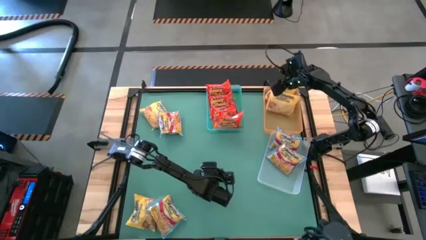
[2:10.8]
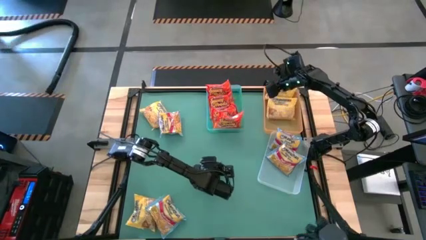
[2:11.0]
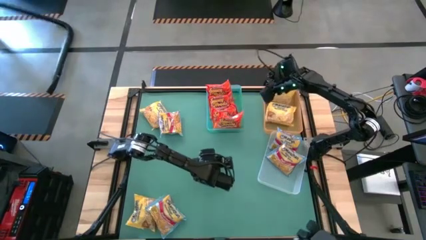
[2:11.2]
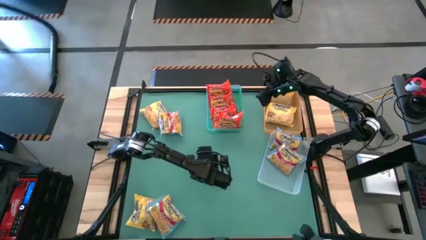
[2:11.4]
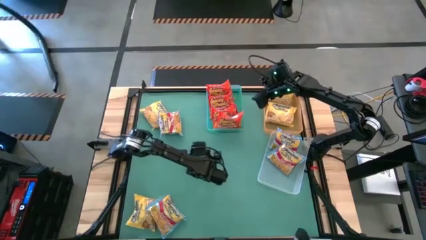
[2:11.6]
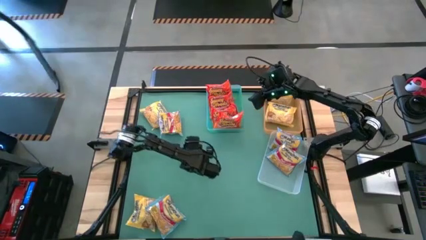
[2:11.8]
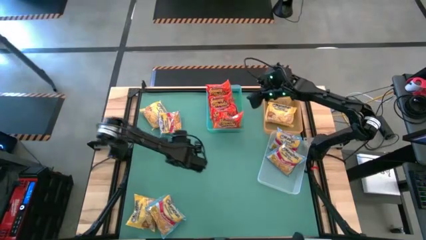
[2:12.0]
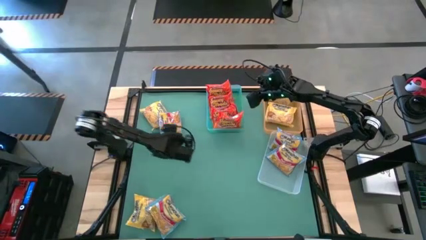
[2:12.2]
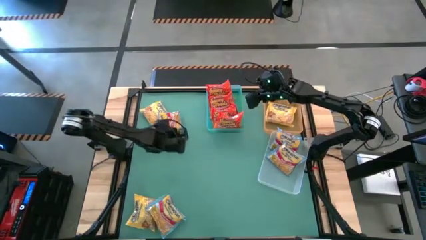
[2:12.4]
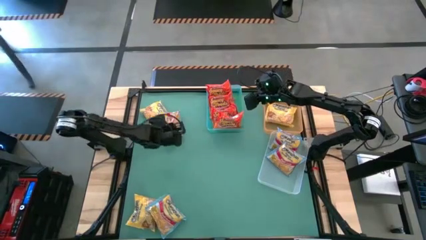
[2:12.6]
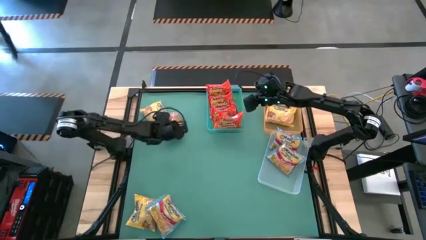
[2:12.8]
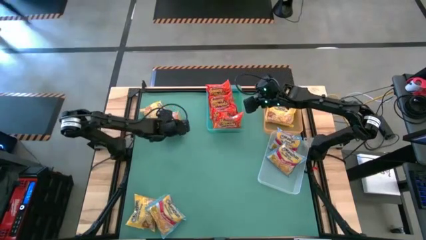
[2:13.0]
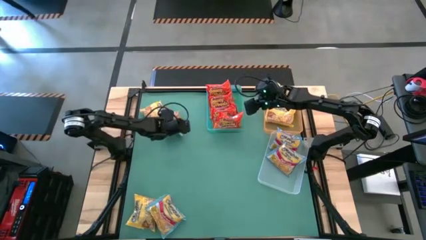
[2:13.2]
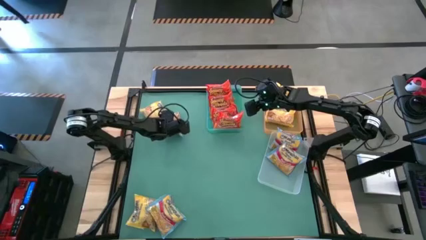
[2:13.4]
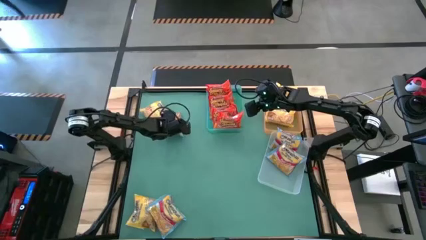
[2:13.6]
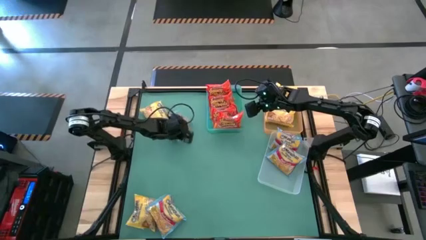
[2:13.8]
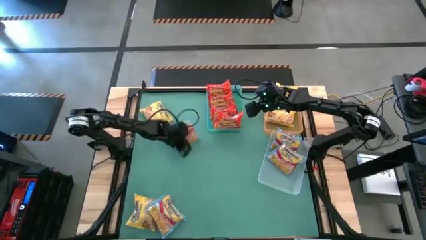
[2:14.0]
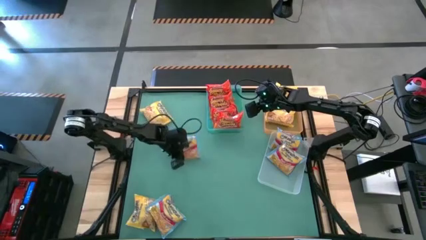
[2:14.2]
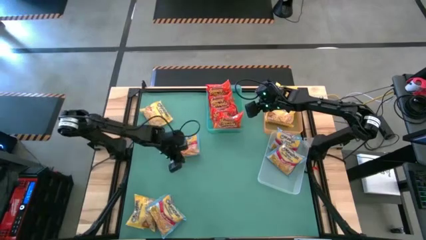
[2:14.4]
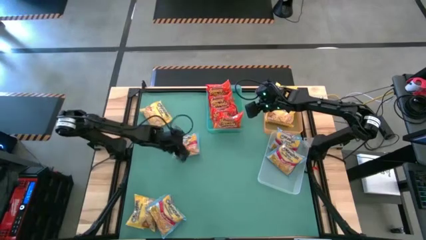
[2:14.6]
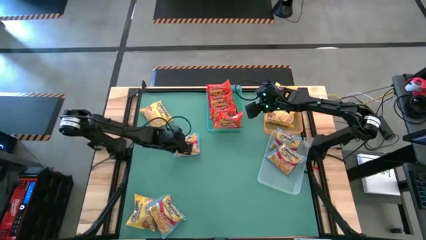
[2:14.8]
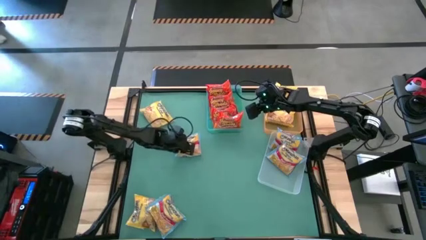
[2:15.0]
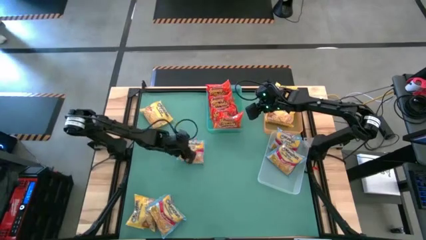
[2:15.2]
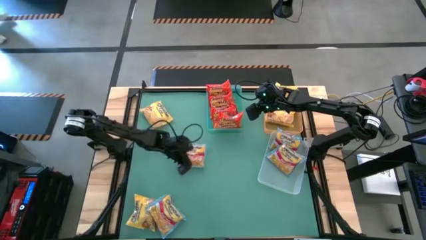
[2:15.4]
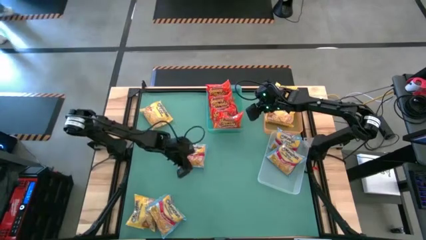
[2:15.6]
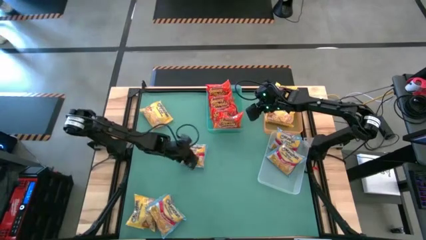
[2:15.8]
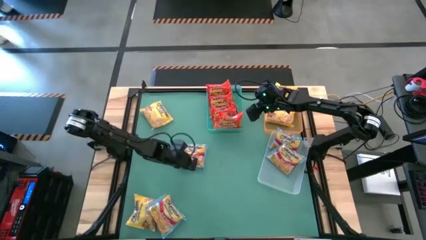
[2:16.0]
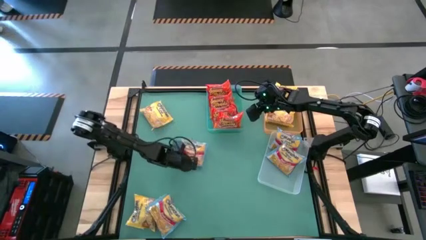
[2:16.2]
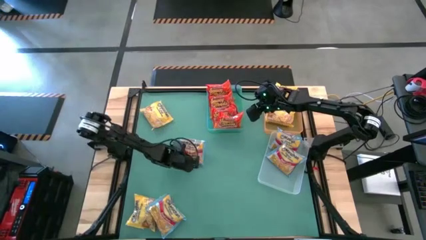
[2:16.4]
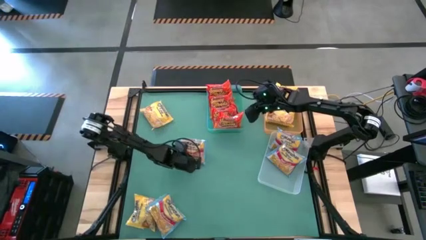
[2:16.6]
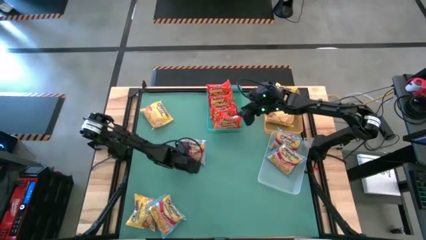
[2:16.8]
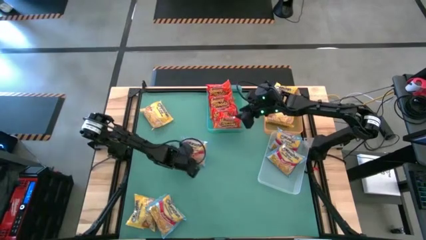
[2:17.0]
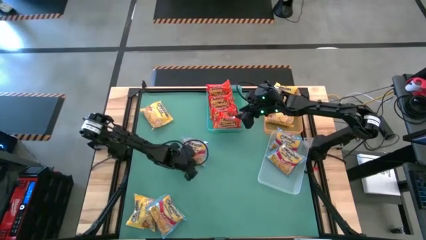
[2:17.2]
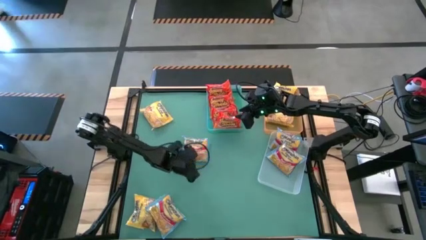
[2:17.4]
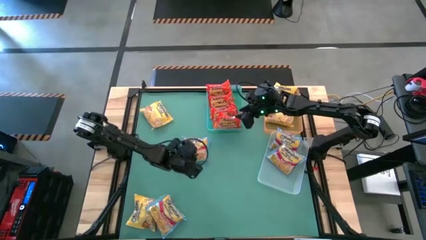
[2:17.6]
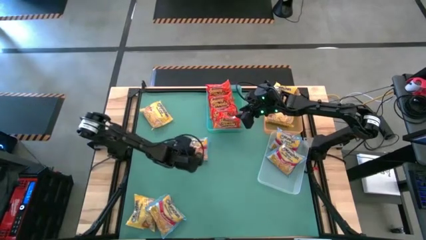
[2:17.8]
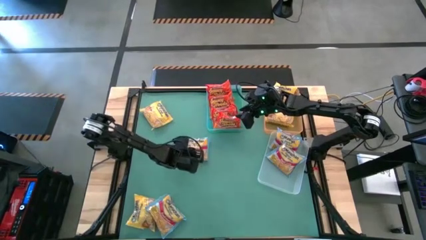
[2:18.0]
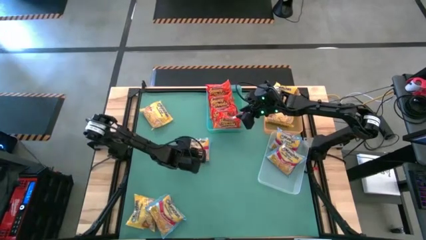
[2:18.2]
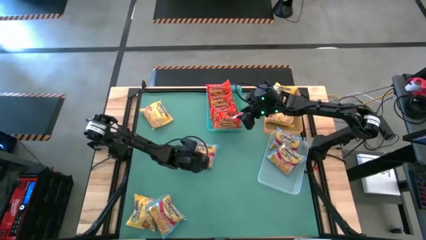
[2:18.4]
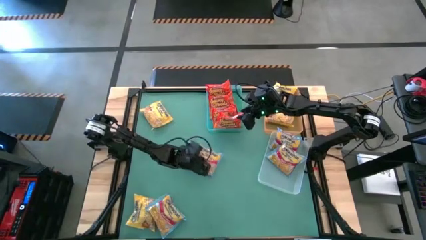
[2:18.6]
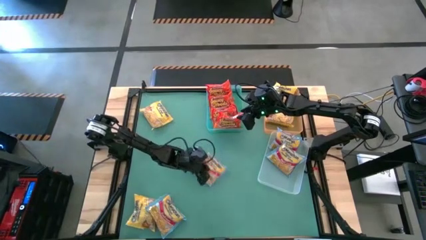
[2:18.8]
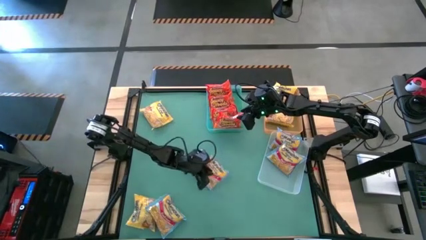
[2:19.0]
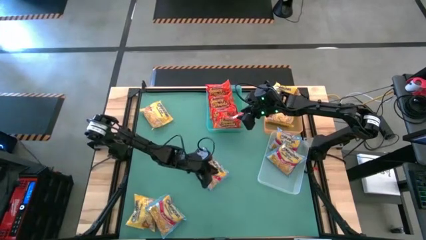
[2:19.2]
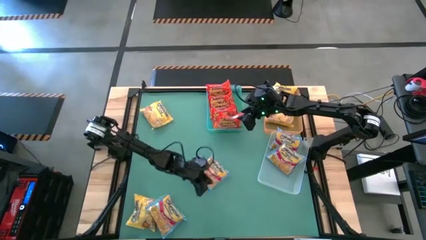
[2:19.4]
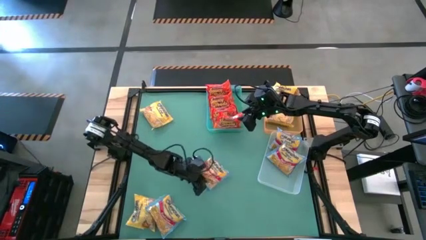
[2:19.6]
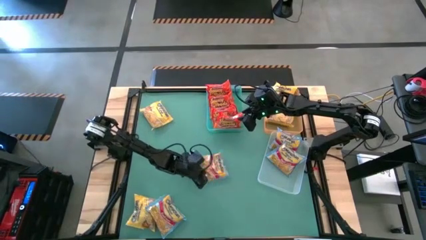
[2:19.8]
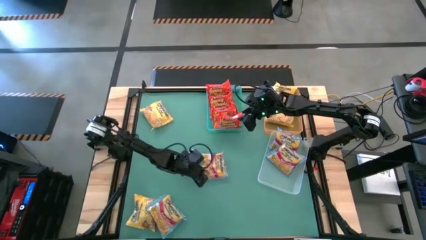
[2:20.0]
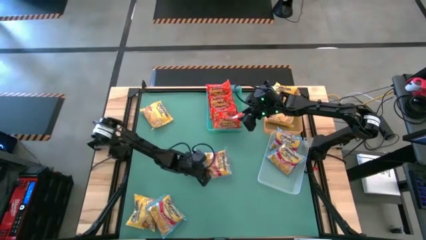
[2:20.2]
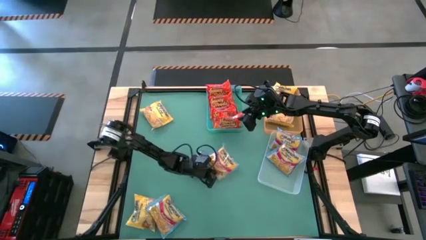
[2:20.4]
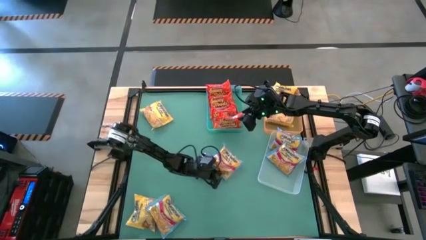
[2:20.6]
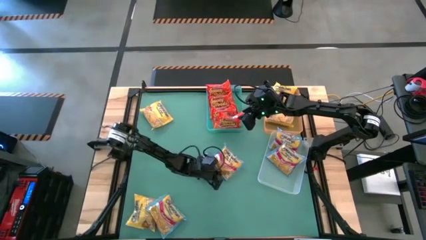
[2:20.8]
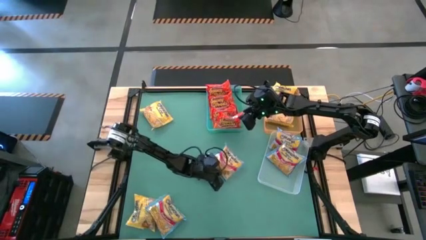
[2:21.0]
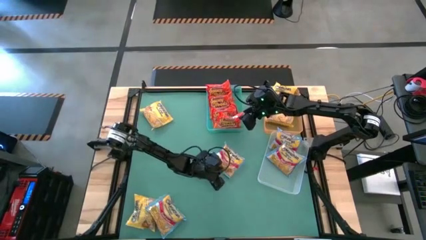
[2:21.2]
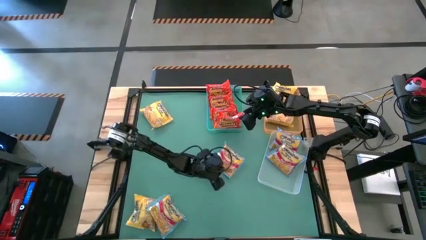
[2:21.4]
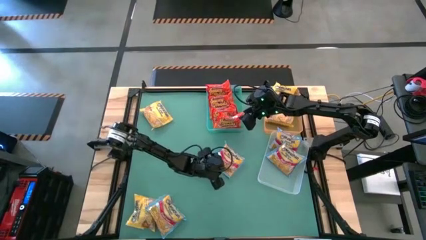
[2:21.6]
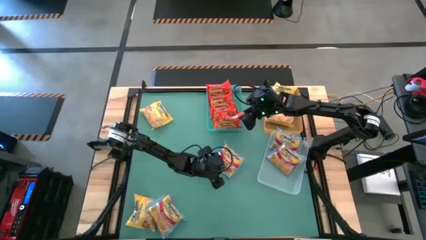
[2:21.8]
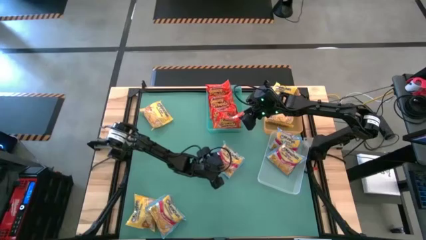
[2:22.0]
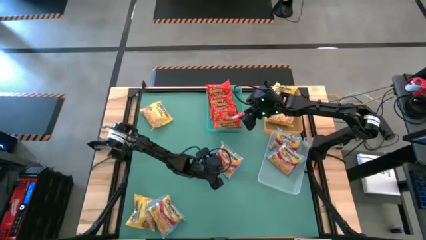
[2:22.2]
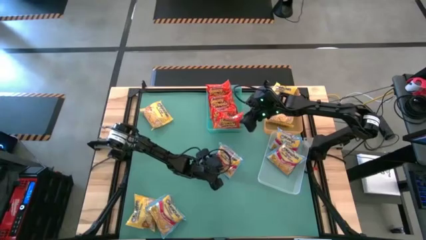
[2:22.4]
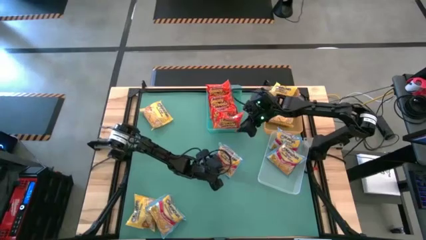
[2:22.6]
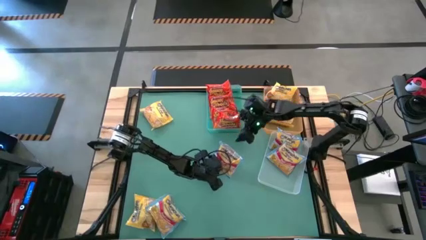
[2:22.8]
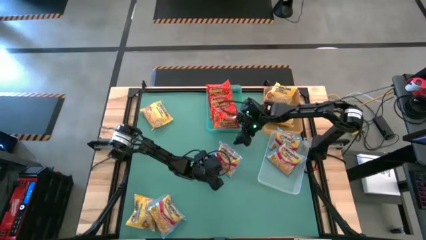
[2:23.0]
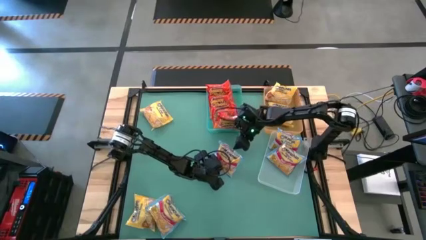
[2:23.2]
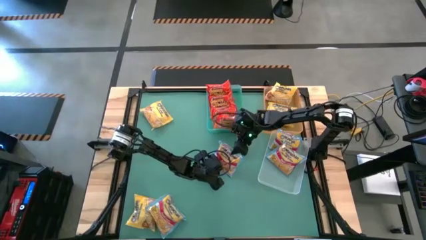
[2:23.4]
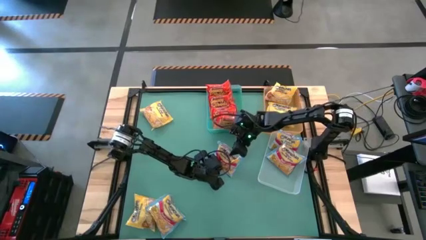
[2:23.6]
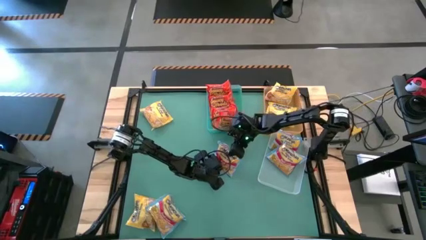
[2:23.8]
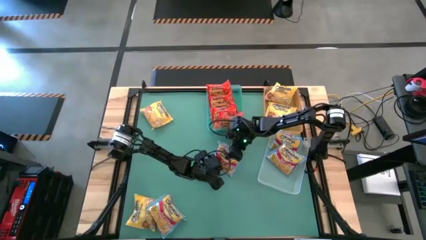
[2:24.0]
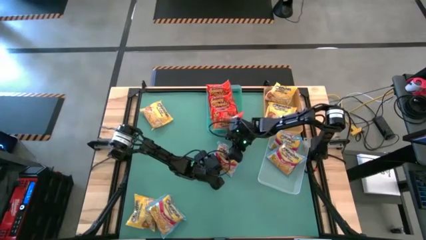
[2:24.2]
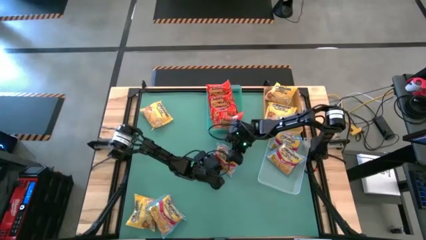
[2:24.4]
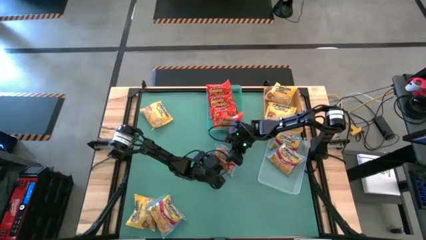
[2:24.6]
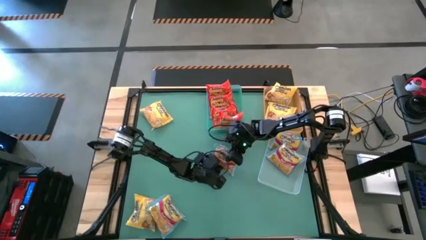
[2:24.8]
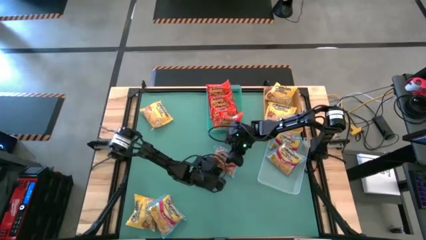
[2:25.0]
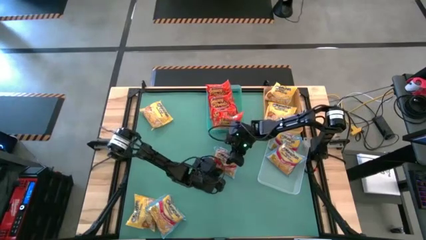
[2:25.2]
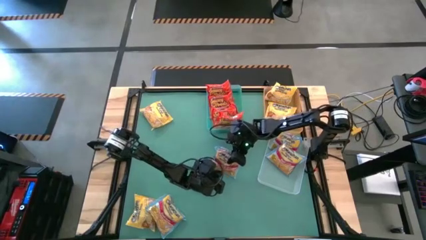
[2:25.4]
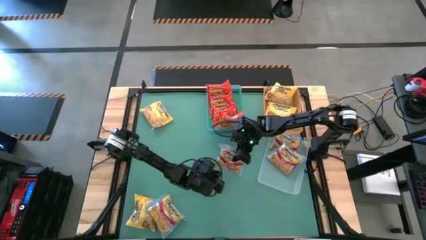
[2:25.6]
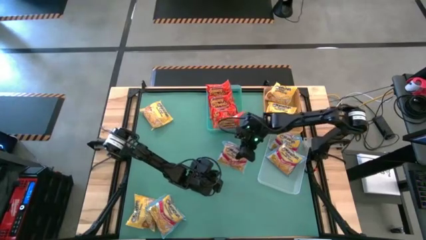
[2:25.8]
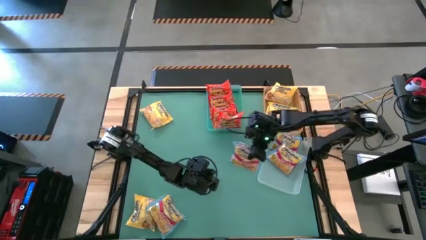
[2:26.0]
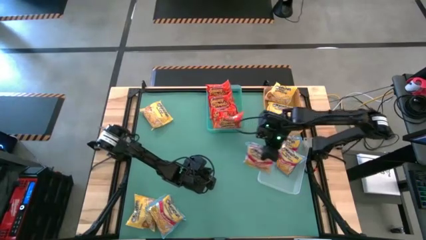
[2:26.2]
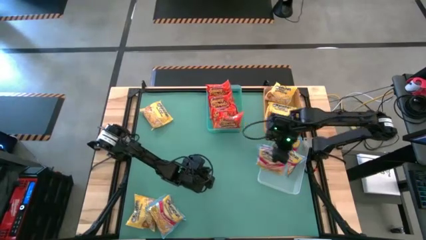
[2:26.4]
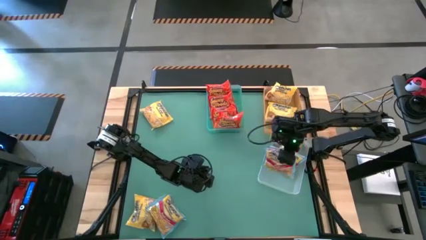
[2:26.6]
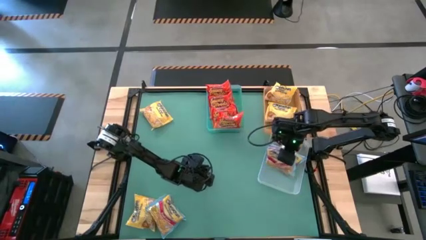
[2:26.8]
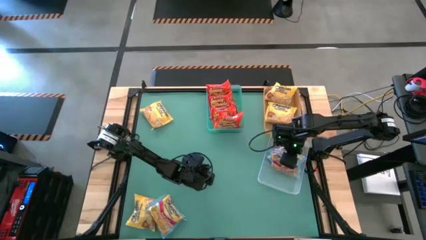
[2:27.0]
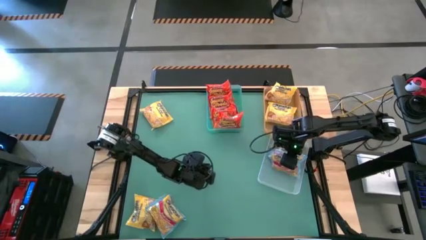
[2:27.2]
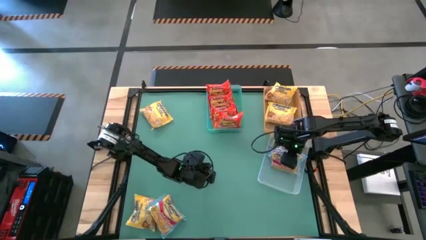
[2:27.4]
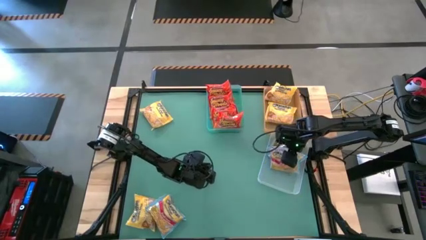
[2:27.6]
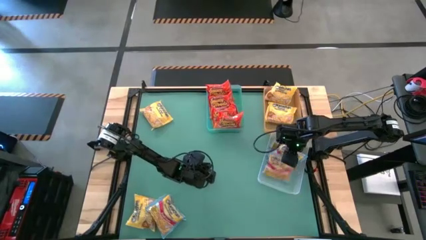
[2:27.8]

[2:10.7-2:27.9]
Task: Sort Maruchan noodles
Put the blue noodle pack into the transparent bin
